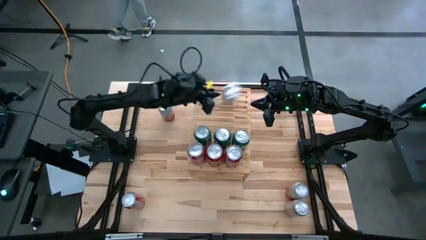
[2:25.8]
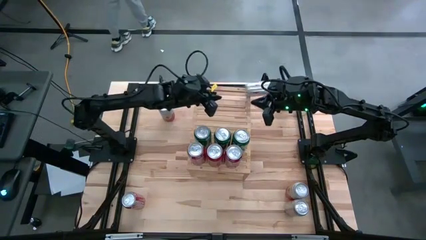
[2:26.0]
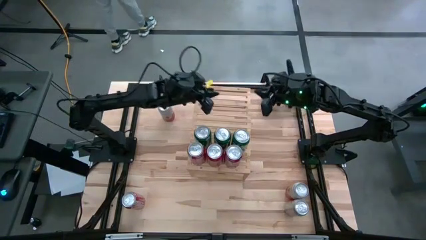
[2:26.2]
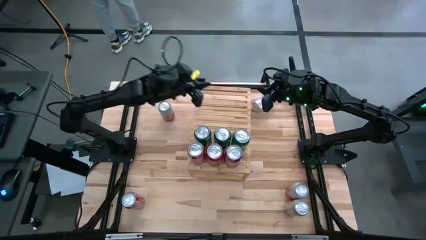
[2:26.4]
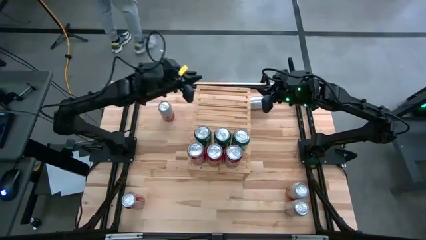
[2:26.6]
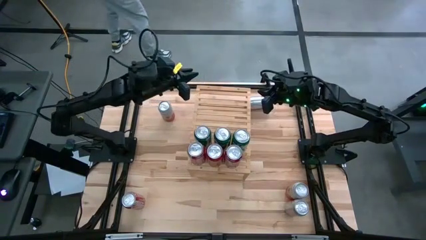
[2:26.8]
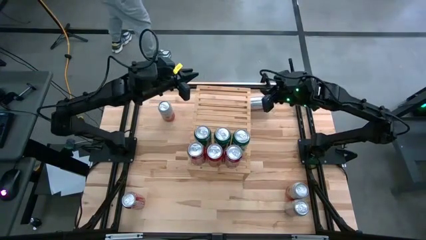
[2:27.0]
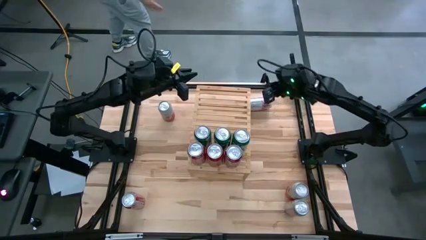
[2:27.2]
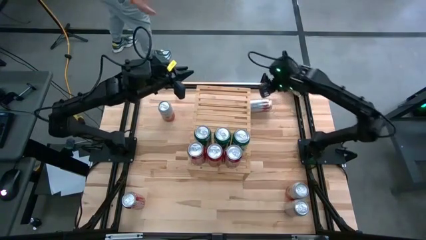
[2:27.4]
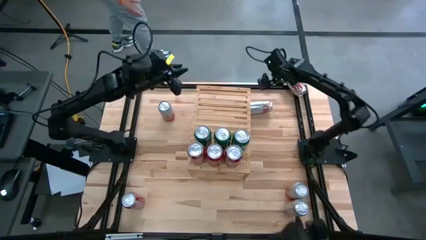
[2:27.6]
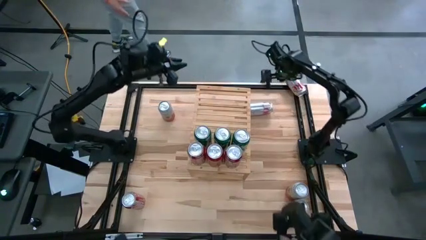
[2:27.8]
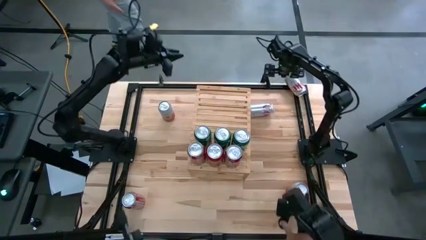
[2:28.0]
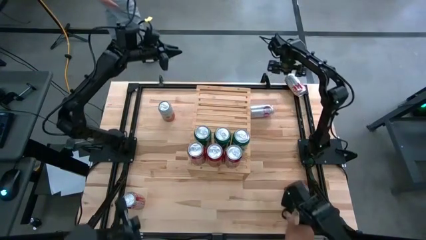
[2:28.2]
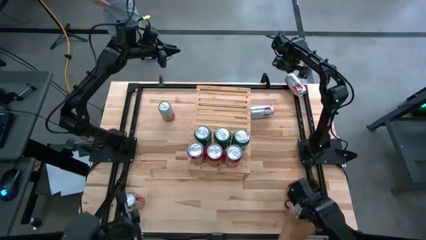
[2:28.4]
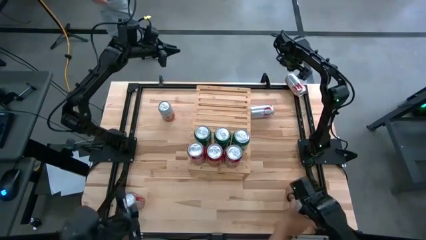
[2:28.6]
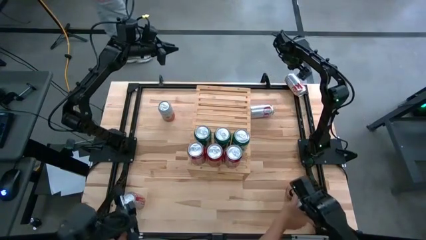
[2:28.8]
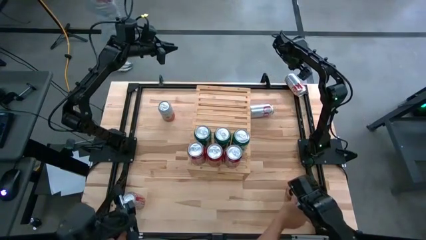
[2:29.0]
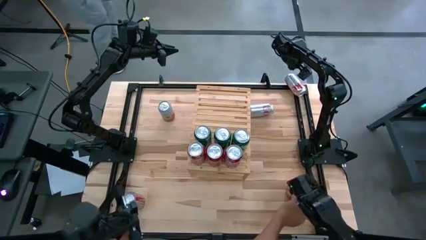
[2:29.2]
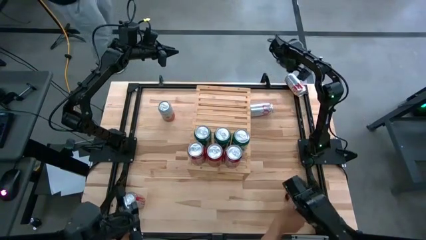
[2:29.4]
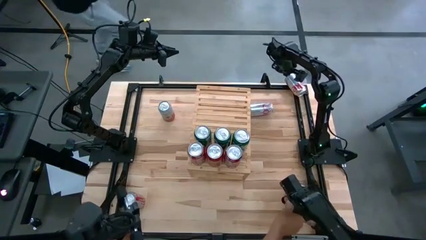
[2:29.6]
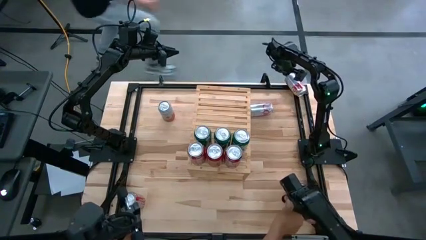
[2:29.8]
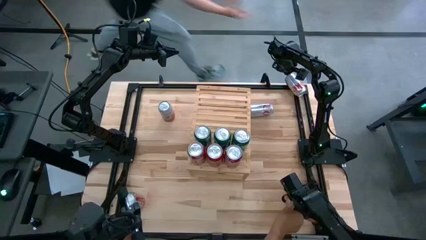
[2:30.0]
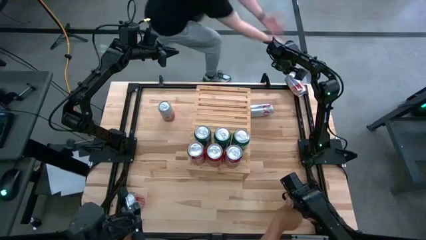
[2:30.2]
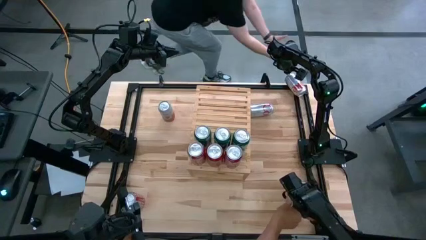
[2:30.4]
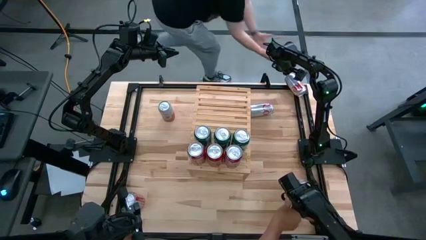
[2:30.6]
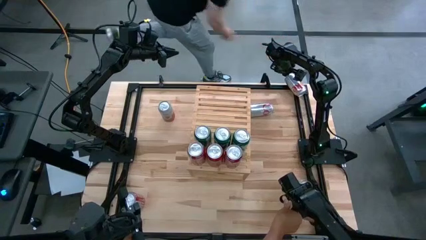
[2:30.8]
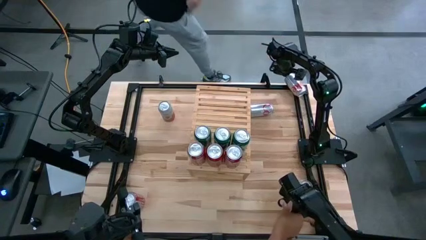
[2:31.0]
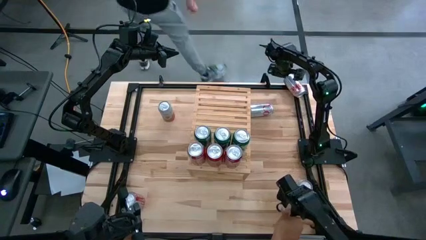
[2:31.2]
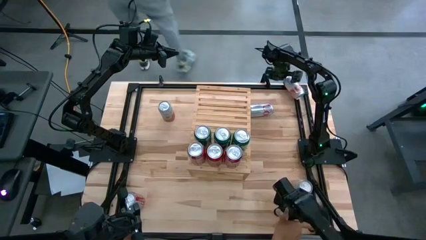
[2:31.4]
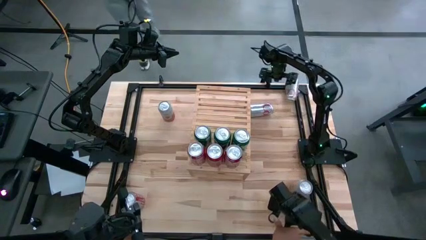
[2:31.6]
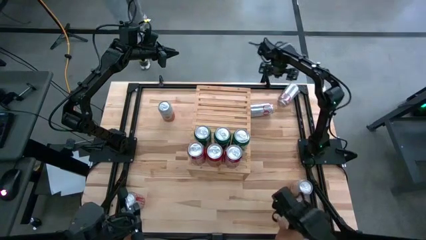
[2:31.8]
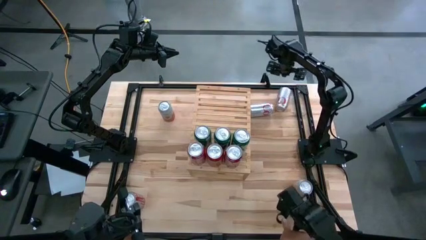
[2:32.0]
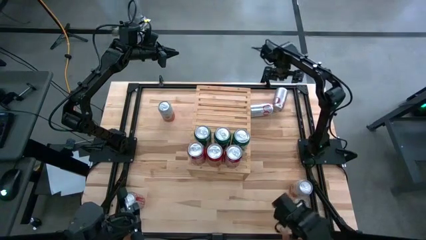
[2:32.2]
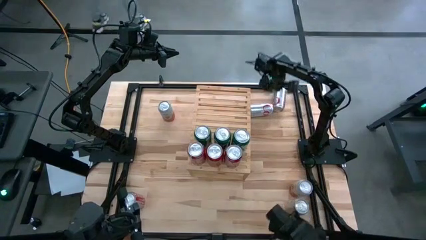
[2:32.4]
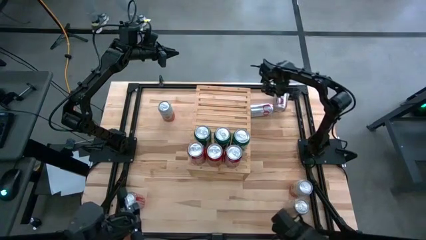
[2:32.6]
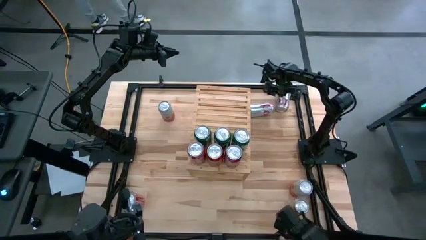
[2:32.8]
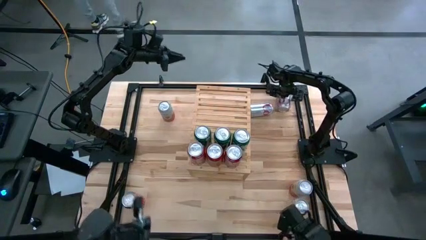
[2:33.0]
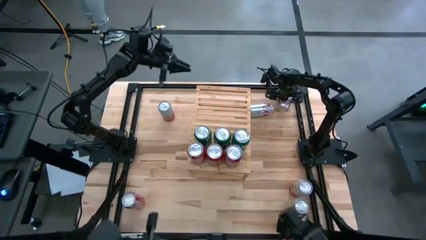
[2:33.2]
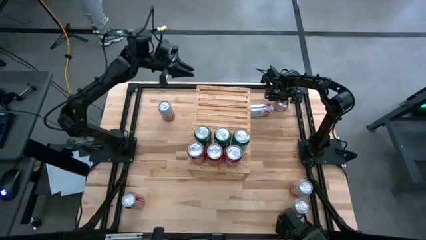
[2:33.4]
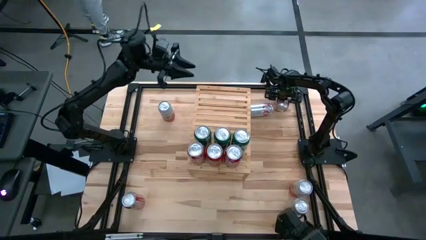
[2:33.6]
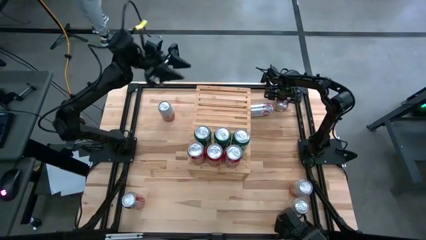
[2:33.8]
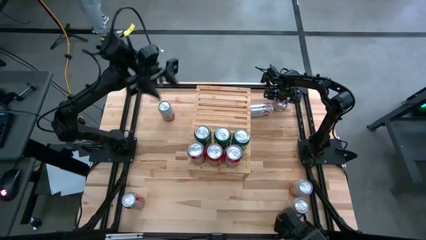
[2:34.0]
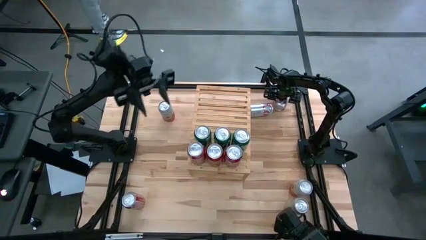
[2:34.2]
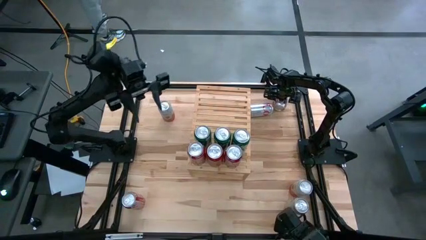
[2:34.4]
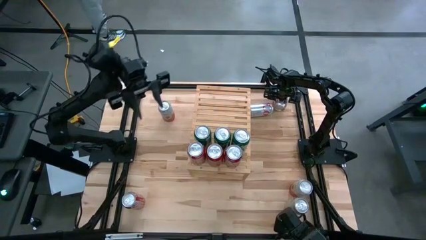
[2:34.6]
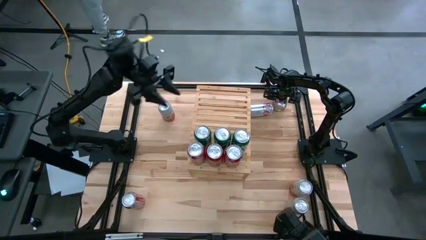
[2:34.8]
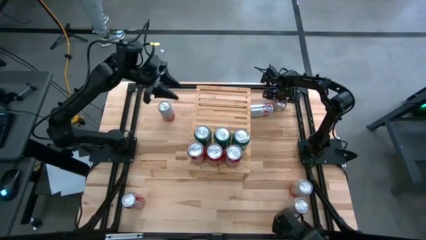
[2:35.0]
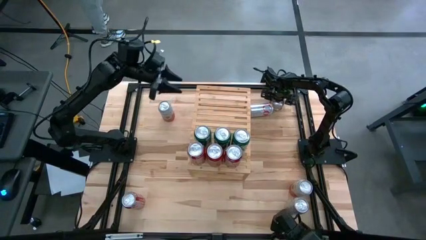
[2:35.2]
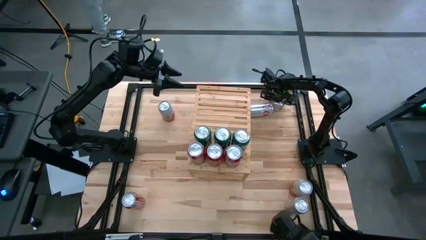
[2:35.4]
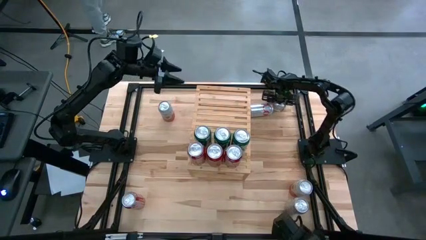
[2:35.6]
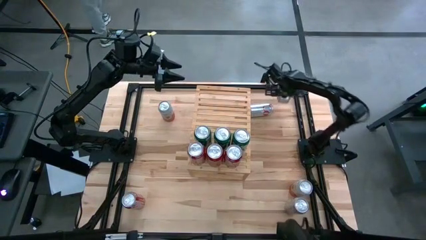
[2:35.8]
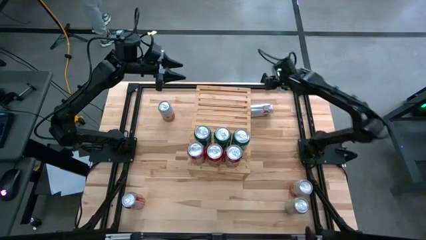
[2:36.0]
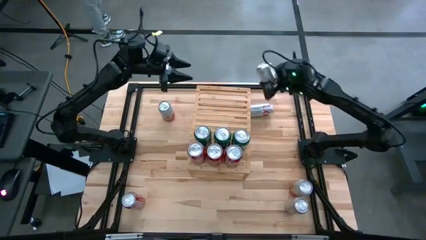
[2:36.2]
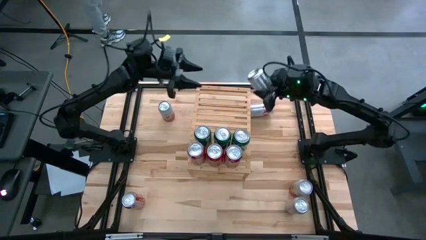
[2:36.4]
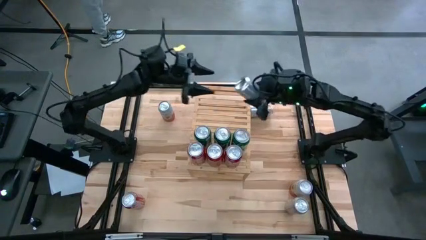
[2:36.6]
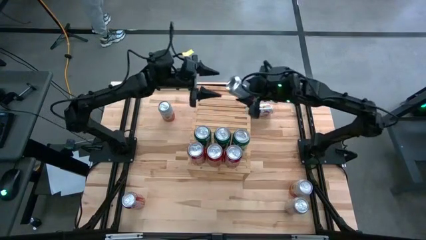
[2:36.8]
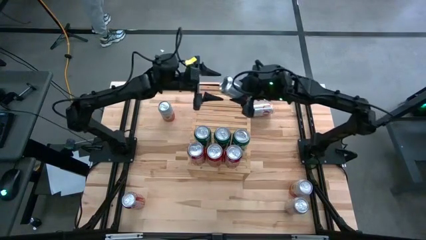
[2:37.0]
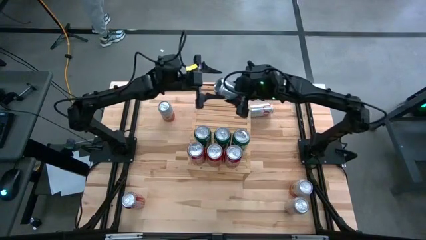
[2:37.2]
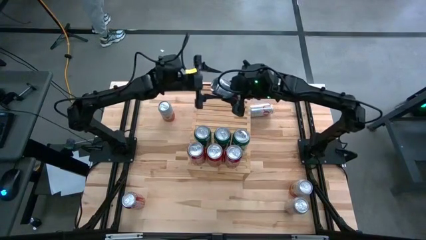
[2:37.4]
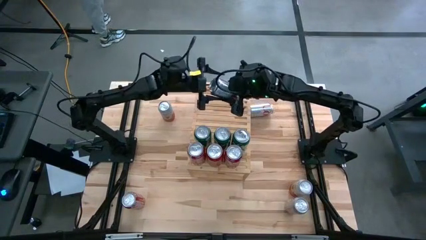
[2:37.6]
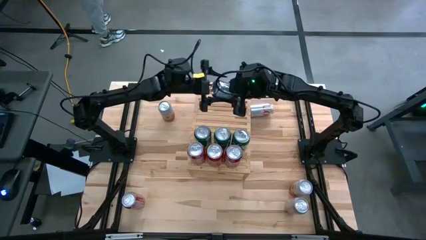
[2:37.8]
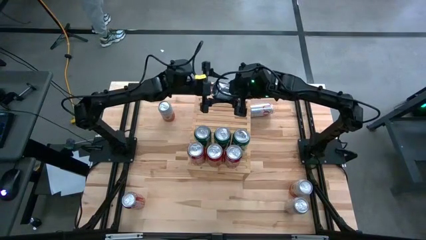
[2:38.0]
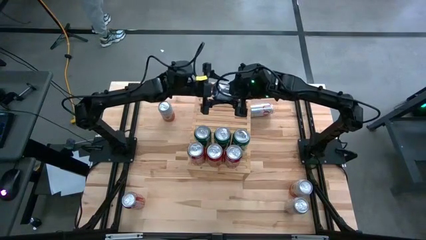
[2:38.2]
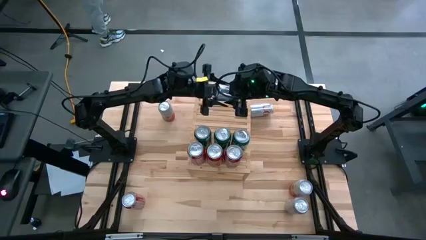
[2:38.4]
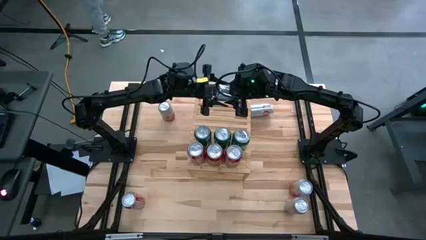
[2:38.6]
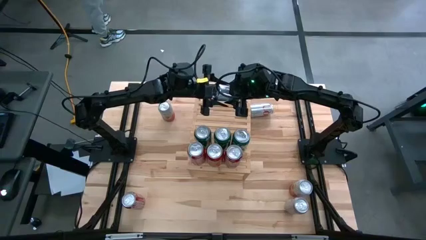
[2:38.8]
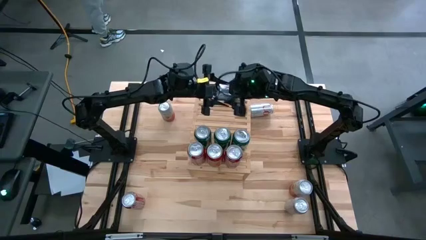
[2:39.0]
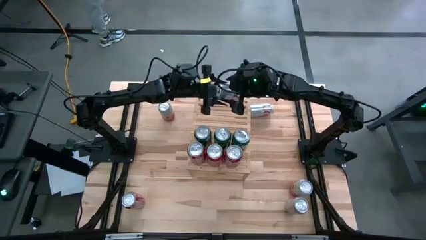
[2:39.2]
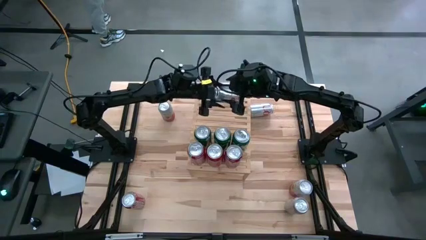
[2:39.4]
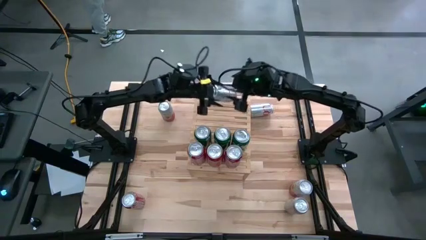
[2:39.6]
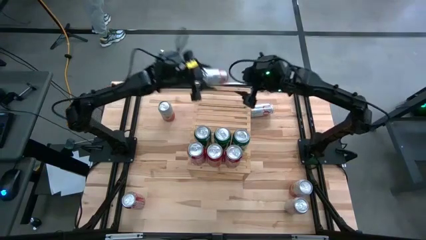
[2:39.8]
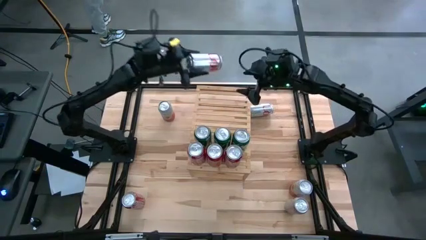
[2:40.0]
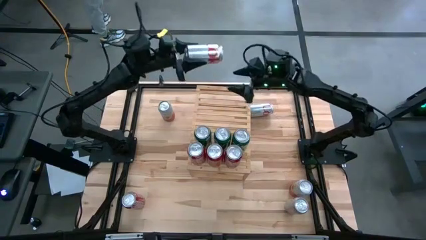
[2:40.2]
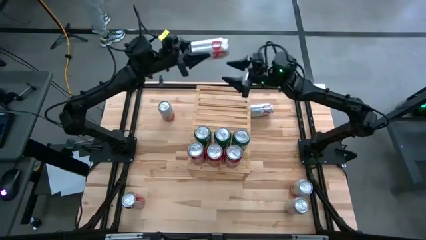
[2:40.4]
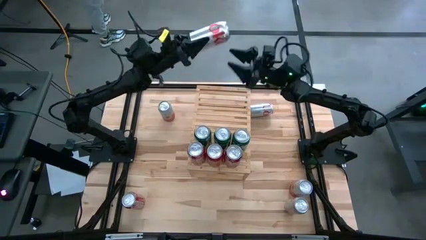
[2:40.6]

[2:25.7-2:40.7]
Task: Place canned beverage on shelf
Put the top left red-silver soda can on the shelf
